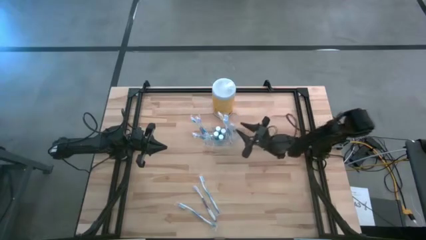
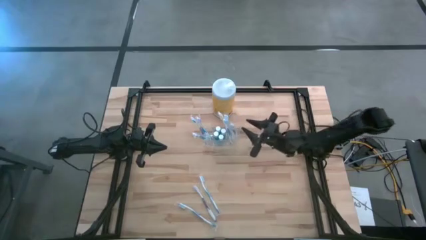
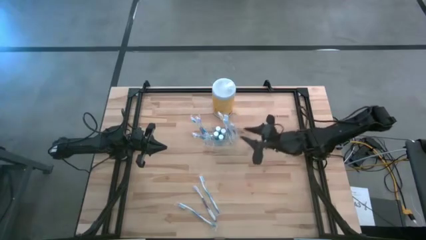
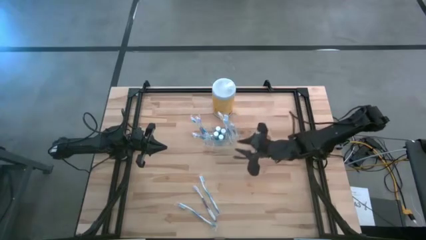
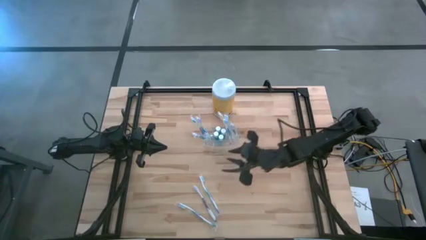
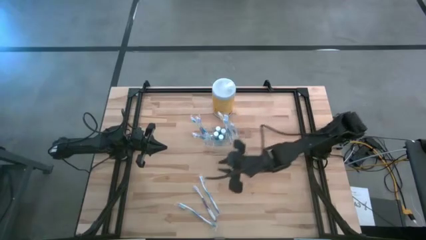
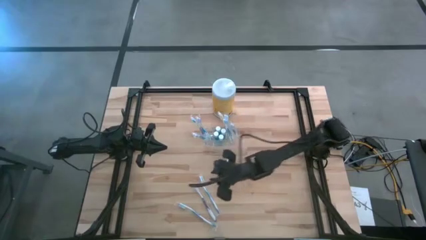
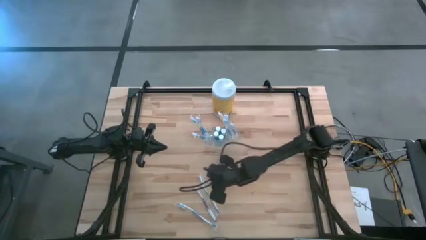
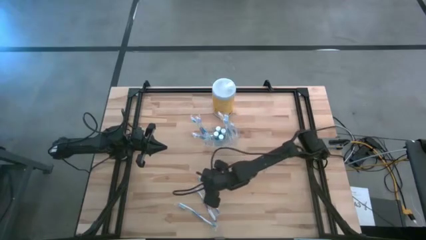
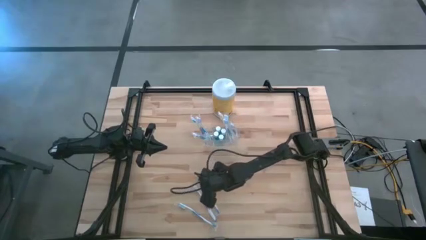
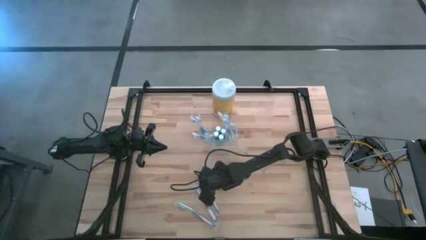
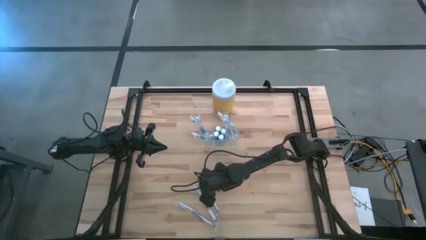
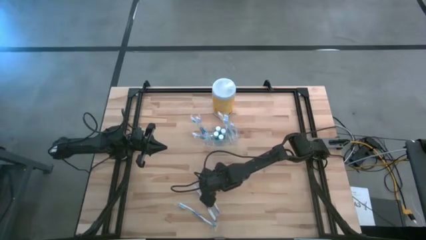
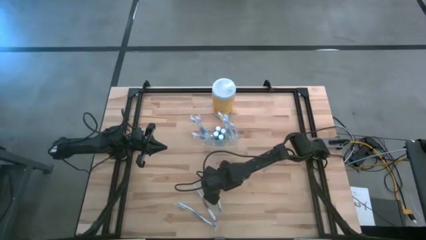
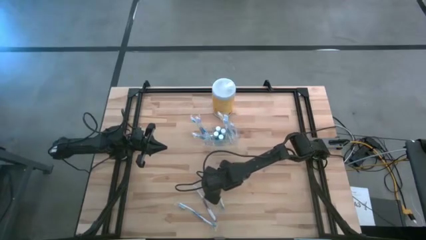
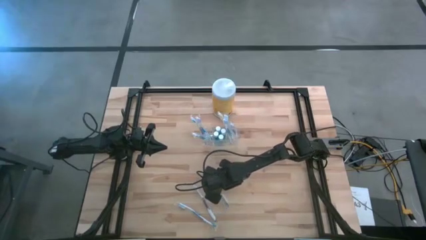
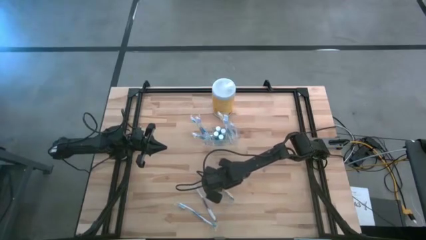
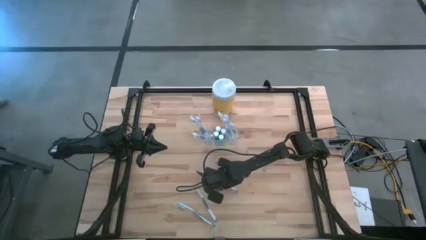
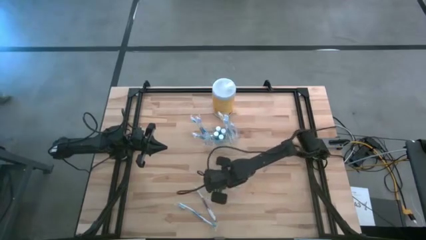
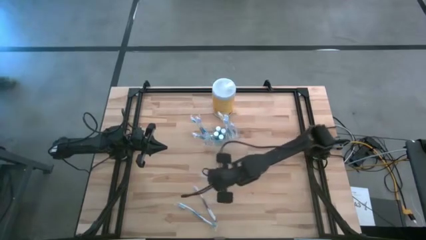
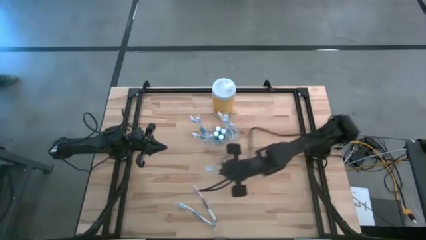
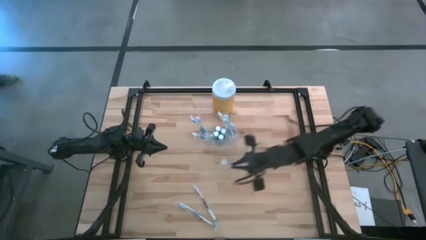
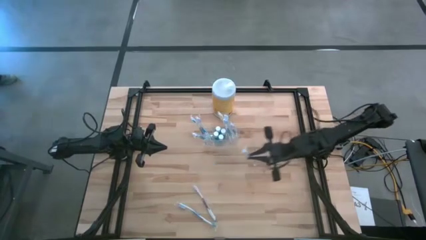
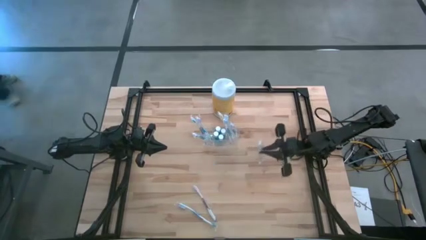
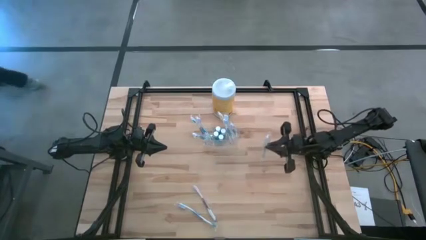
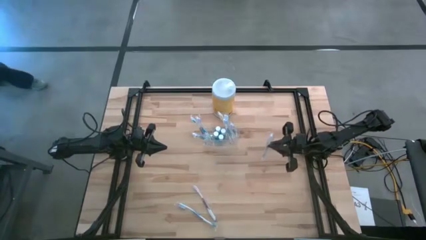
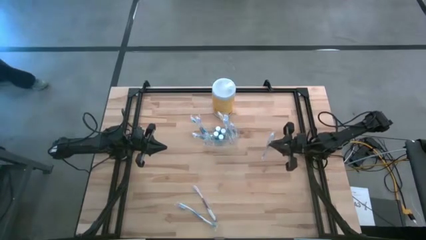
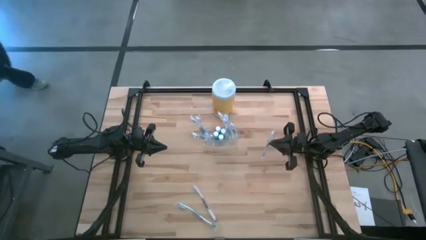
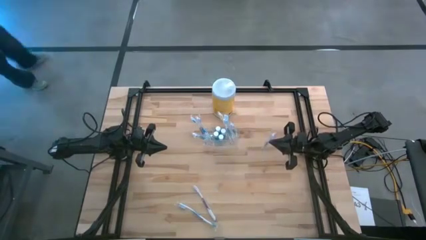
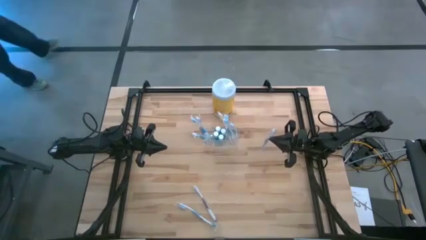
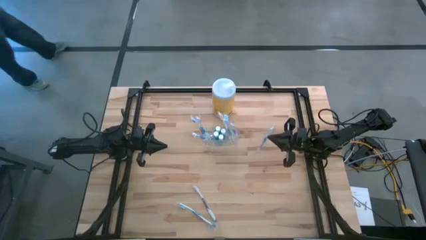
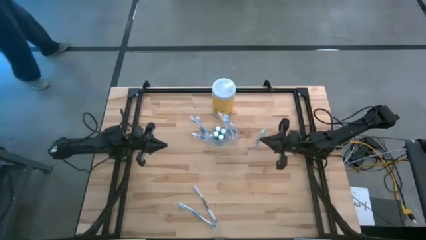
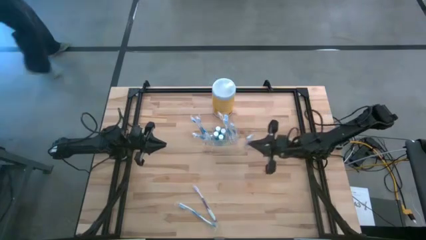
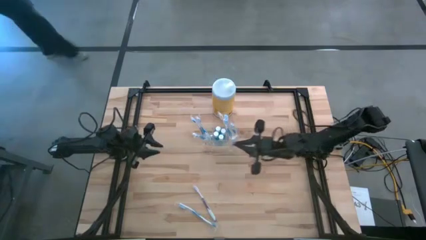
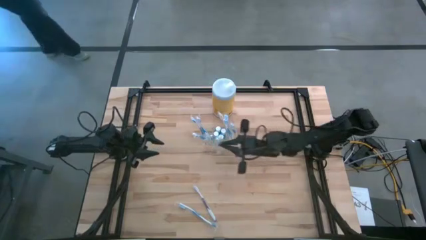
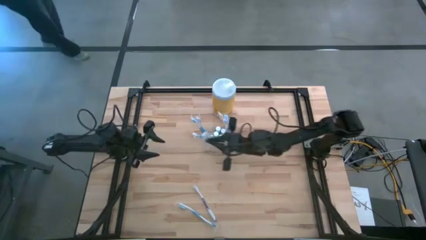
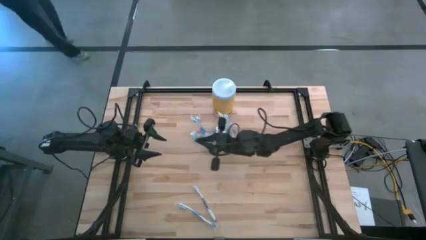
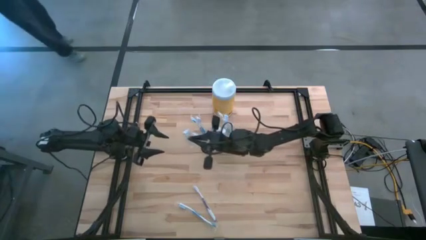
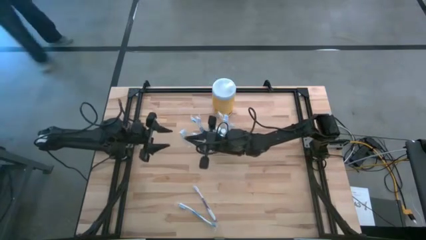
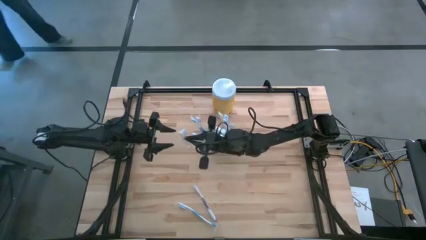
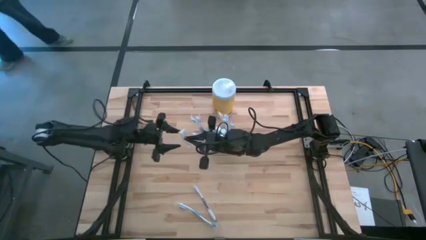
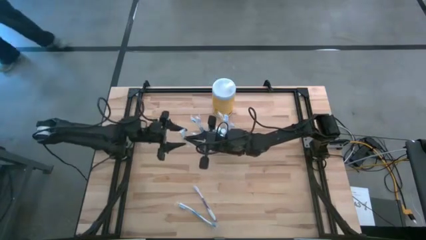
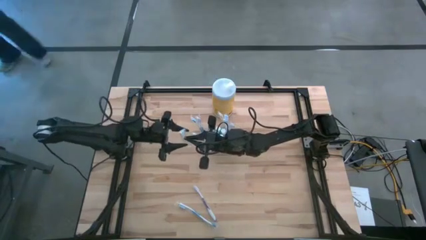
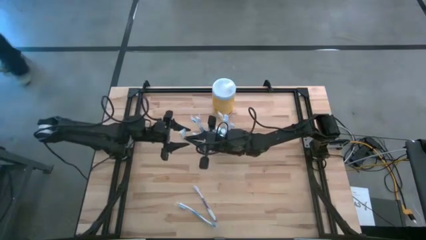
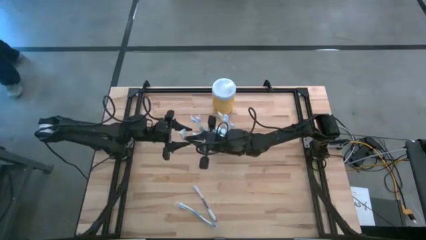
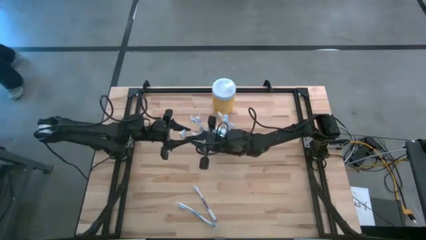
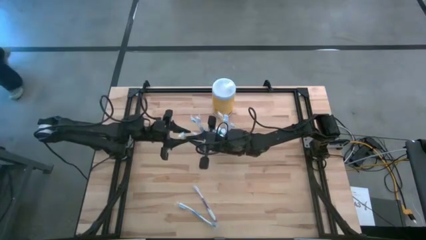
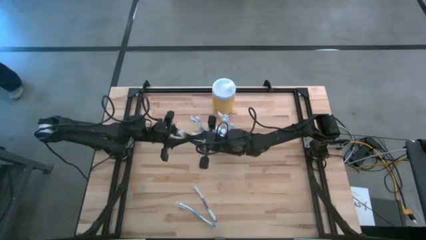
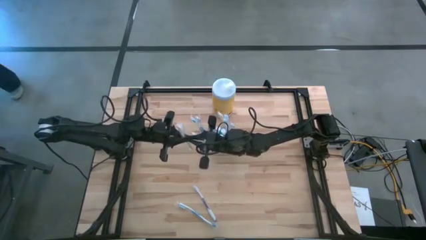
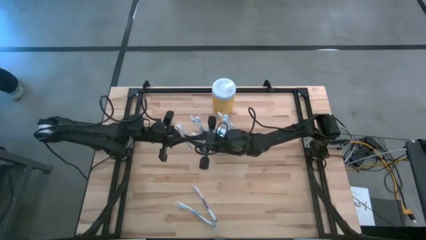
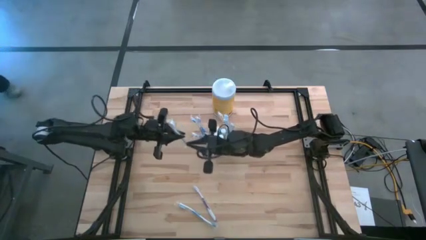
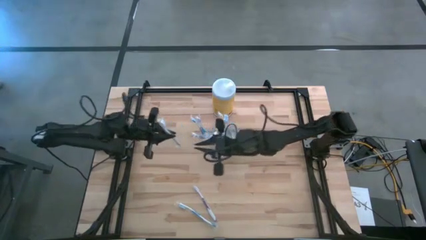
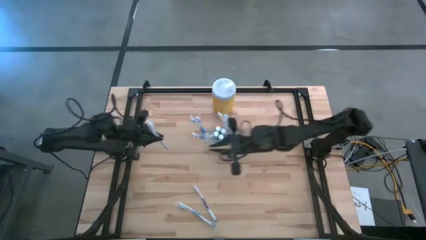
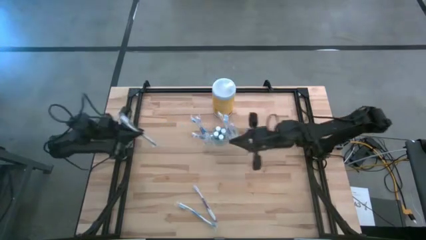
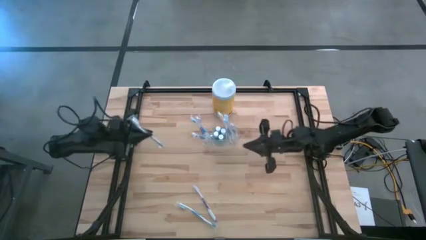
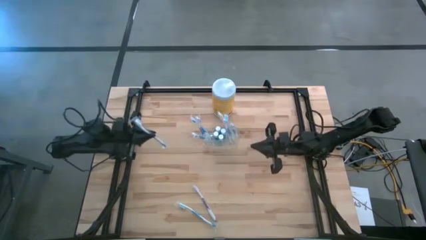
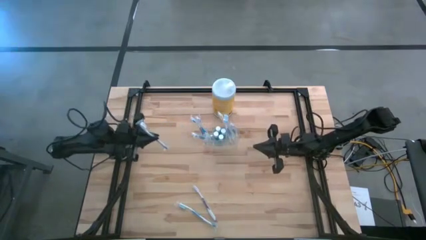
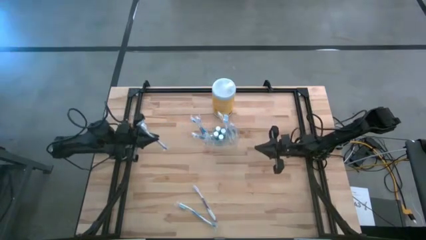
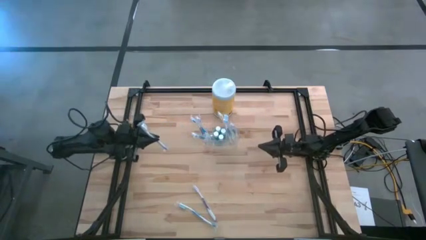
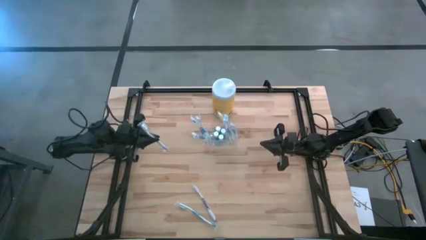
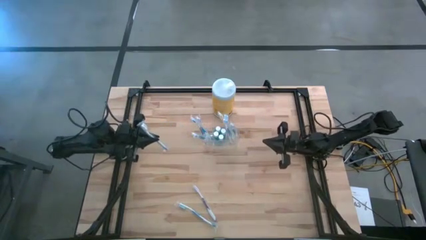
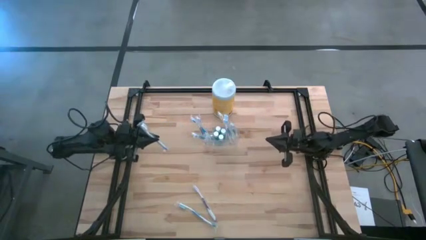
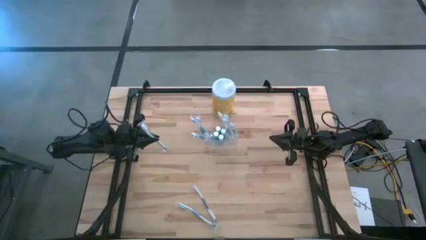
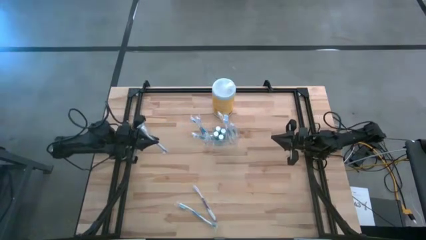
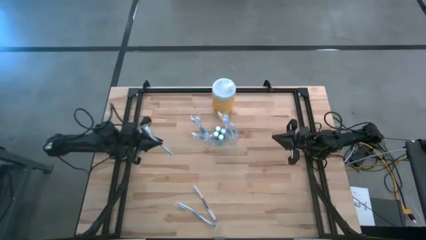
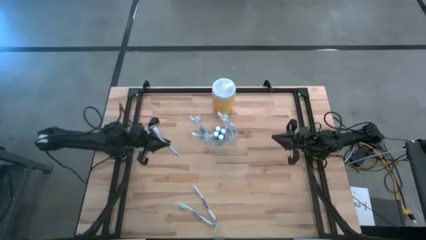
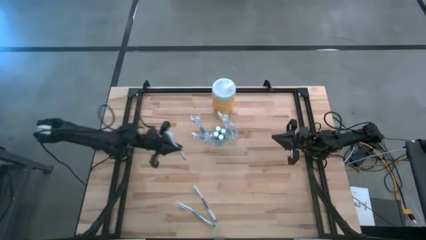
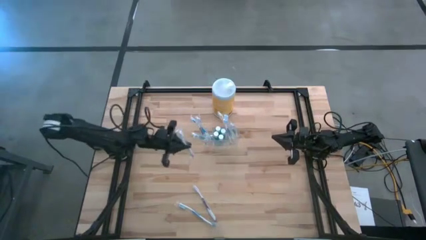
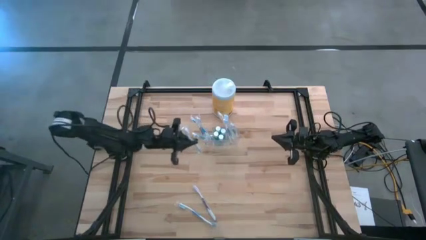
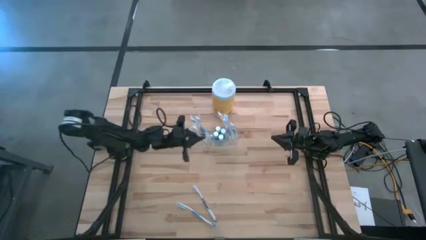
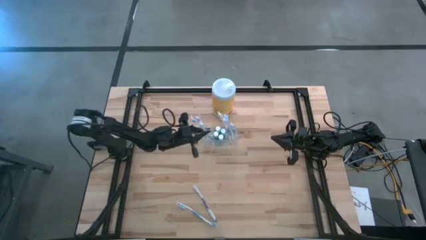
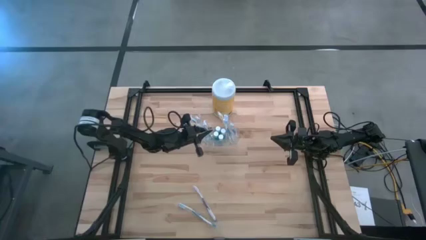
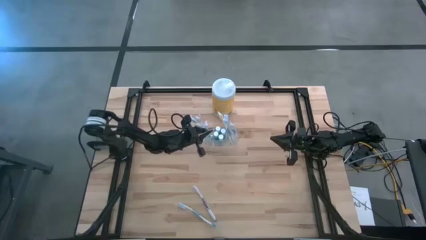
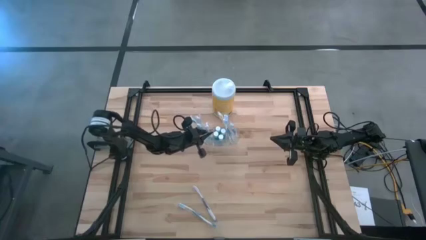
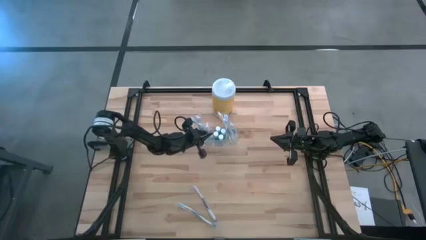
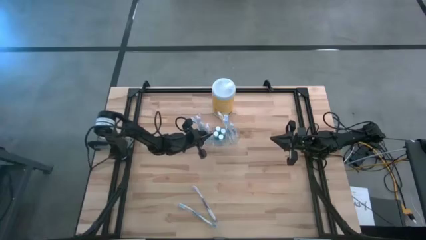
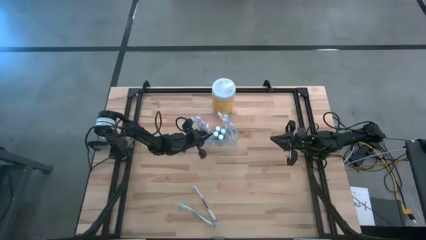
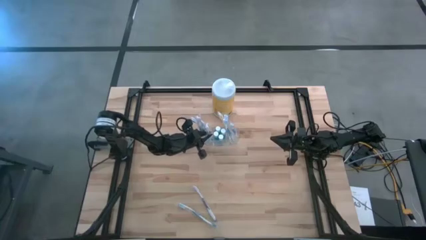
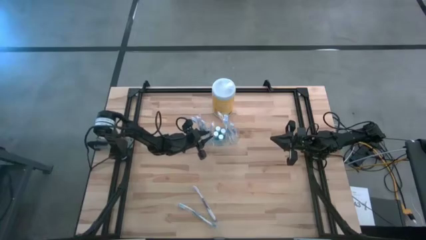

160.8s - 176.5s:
Task: Pick & Place toothbrushing station
Put the blue toothbrush into the transparent organizer
